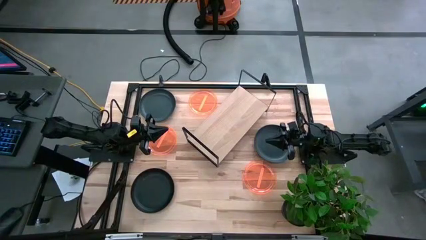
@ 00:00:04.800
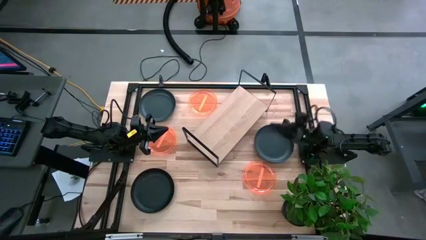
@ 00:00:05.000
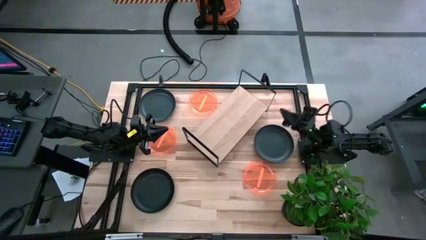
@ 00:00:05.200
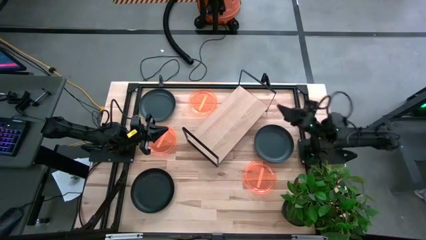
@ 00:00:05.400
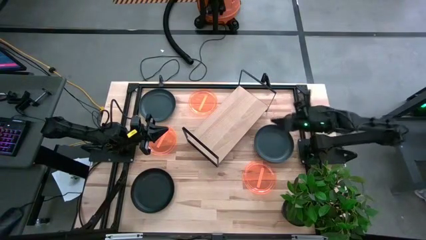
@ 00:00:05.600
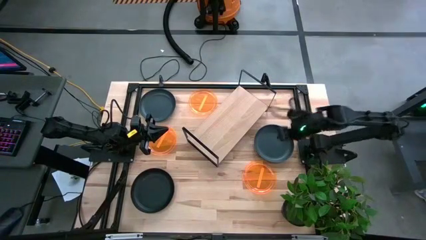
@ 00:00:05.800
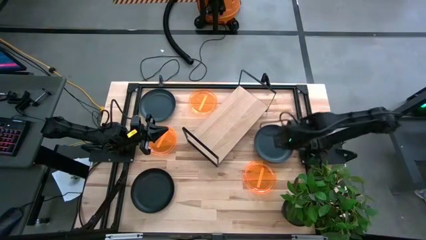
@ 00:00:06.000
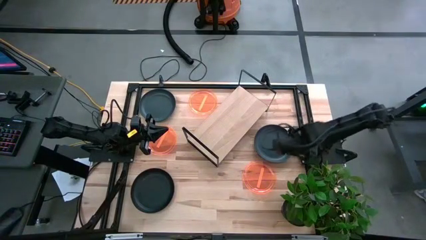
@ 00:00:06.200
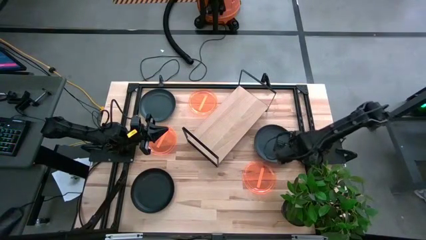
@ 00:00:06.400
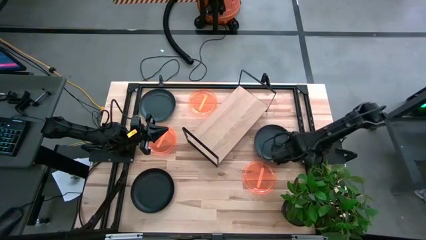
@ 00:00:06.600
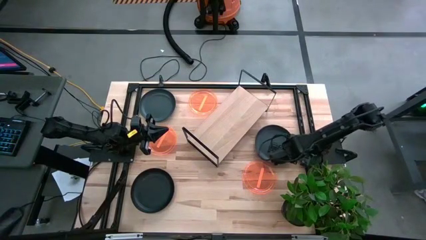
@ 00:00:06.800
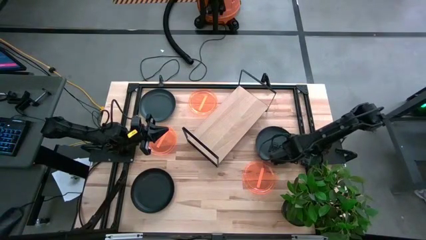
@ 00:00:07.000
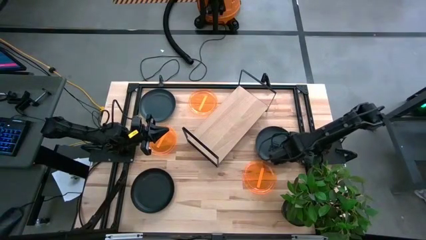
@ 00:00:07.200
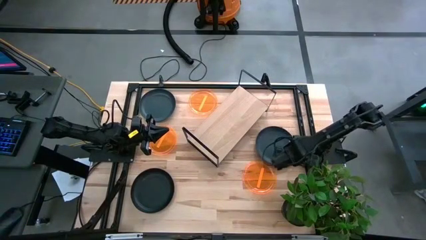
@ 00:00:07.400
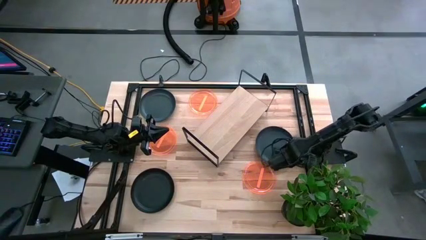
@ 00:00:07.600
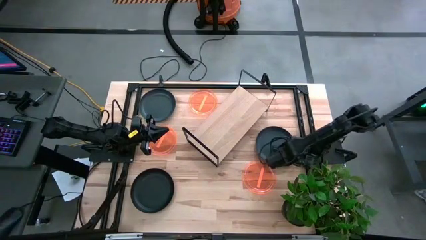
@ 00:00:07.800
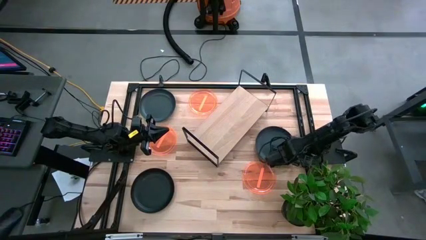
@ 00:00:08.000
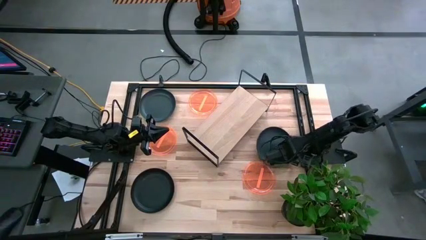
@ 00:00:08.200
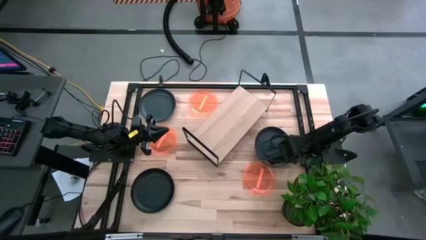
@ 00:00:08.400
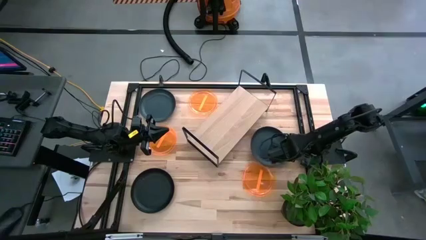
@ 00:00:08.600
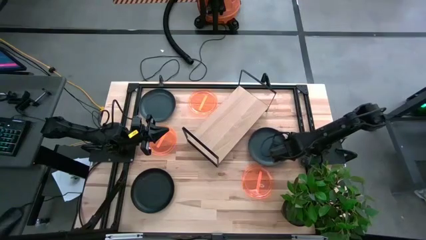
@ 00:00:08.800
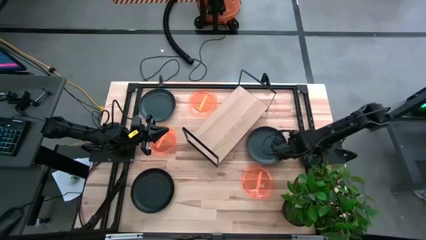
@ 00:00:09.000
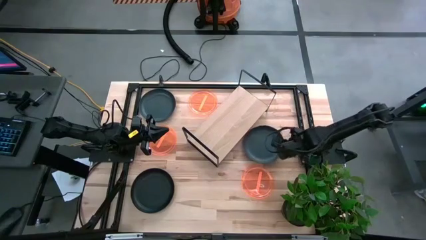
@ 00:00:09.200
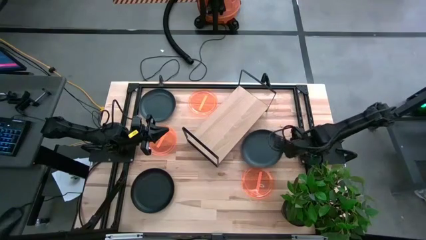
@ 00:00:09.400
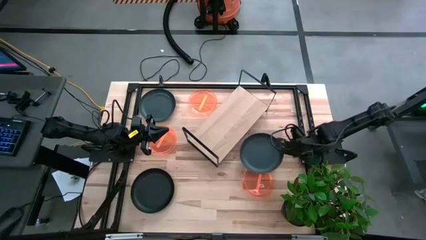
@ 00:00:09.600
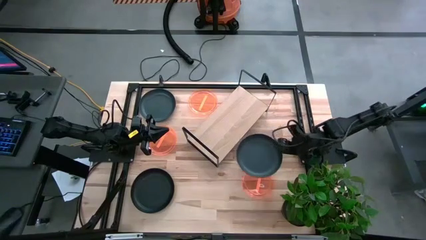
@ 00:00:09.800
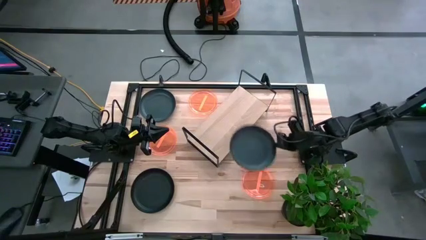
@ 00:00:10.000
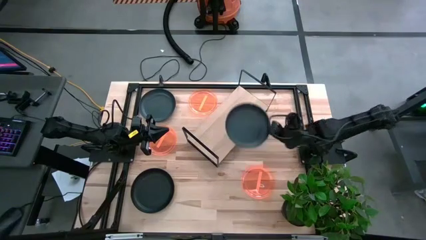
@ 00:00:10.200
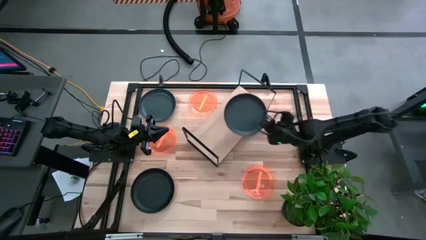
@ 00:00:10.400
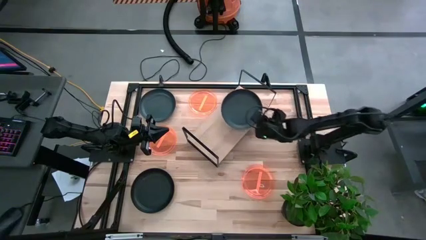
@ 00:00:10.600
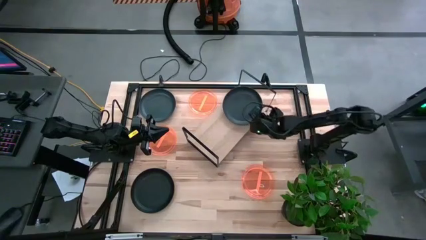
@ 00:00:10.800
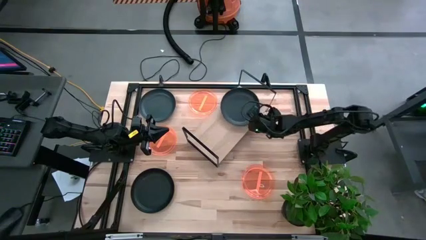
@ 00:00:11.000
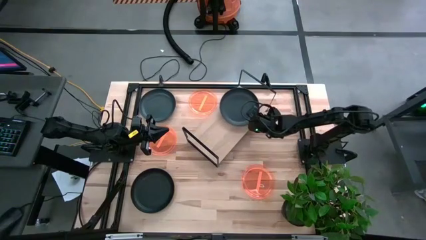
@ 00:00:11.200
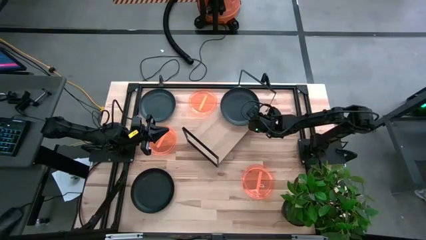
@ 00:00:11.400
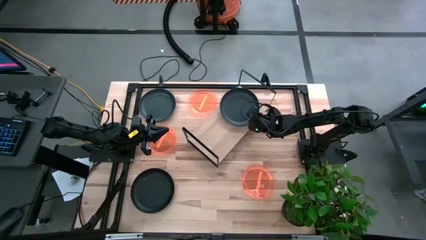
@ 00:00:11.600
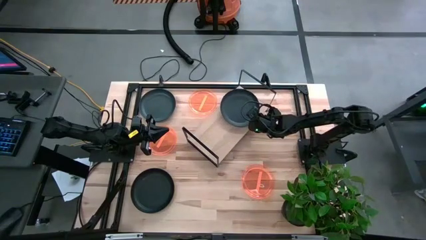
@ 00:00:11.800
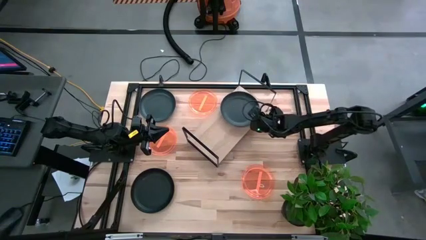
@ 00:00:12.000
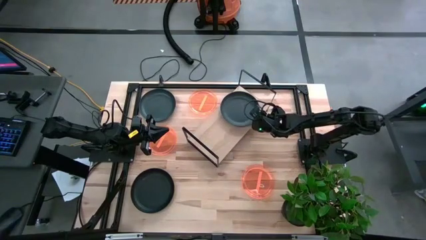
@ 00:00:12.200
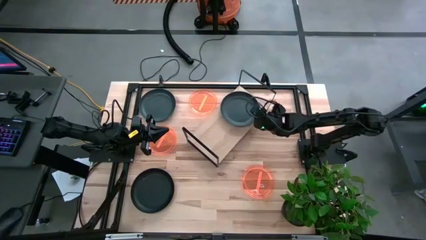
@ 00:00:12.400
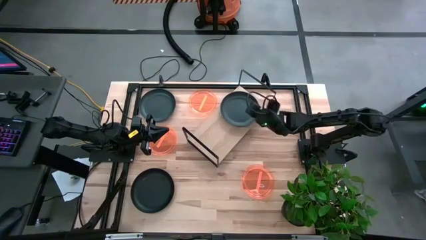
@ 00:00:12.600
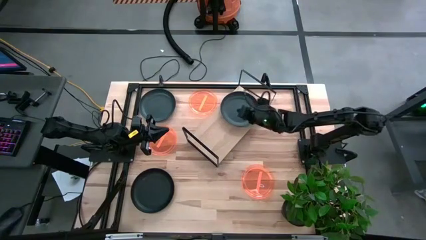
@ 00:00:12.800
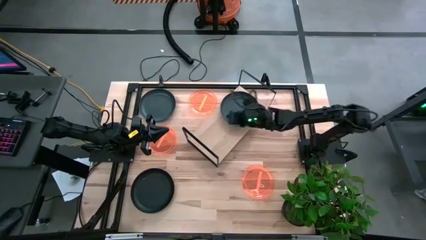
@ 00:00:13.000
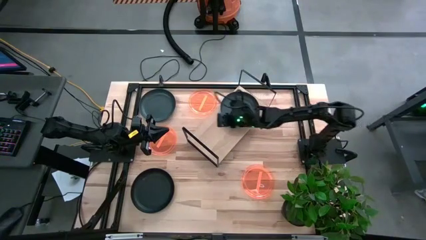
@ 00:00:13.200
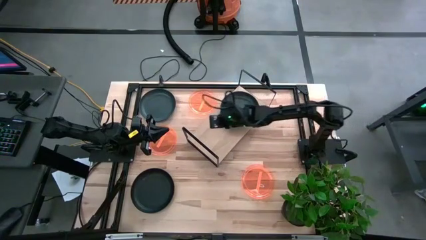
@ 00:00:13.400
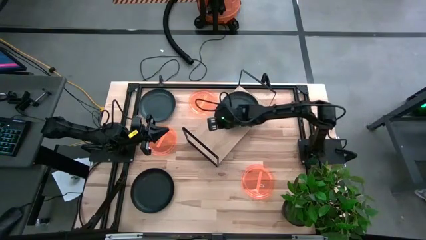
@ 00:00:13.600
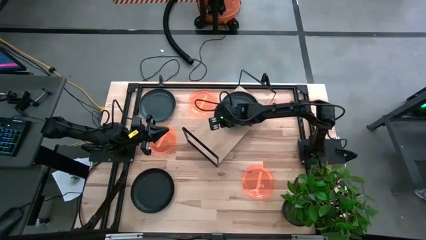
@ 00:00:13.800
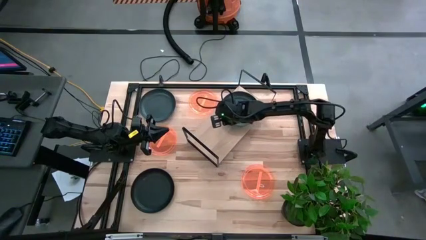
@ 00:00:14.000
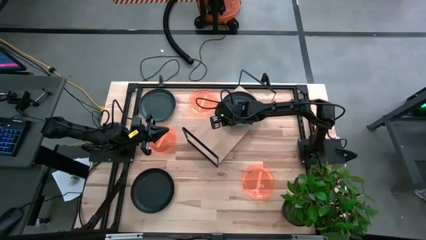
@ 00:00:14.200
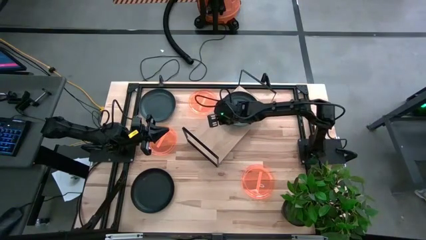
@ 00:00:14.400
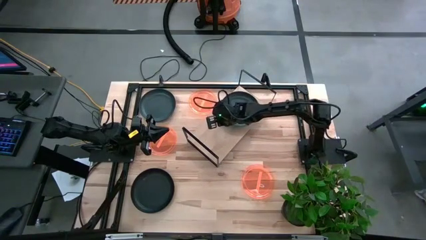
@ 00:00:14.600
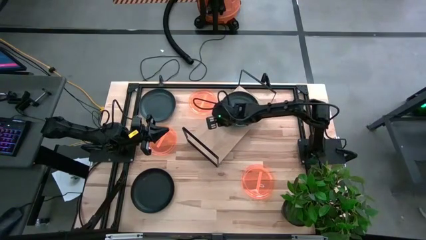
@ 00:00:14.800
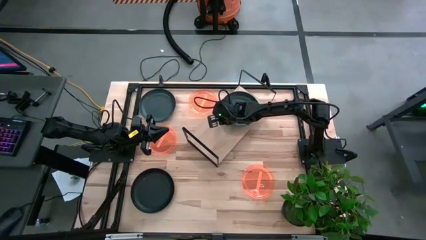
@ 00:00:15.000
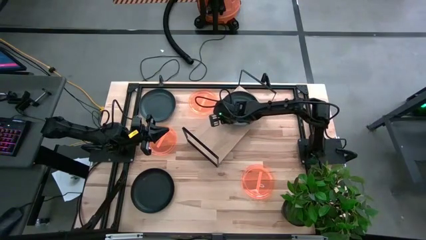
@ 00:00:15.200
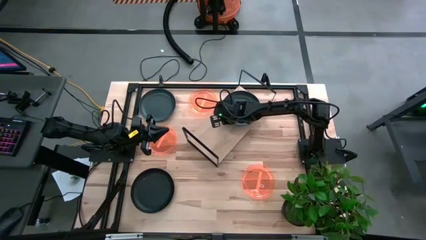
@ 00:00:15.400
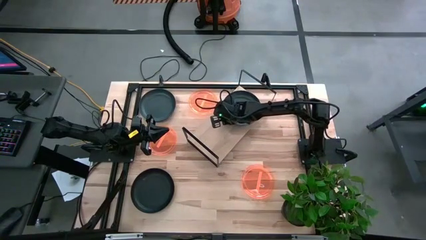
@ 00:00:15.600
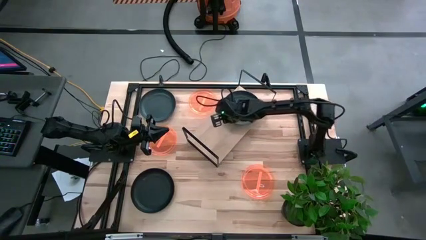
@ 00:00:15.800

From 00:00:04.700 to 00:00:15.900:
Task: Place and stack plates onto a shelf
Put the right black plate on the shelf
